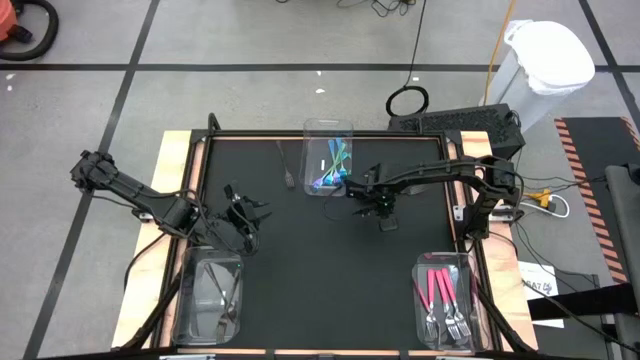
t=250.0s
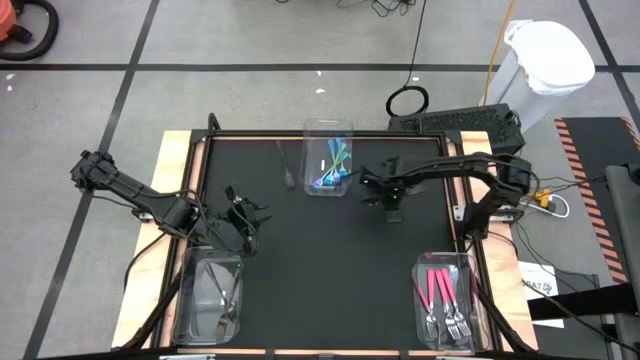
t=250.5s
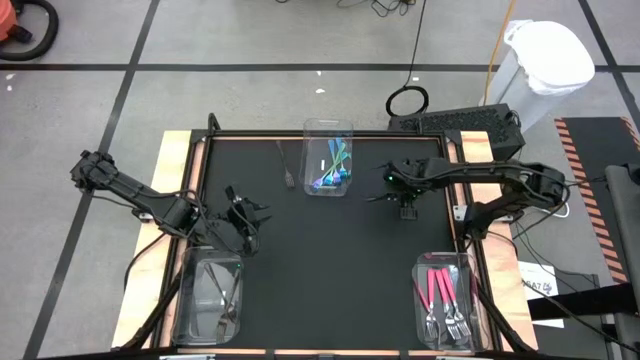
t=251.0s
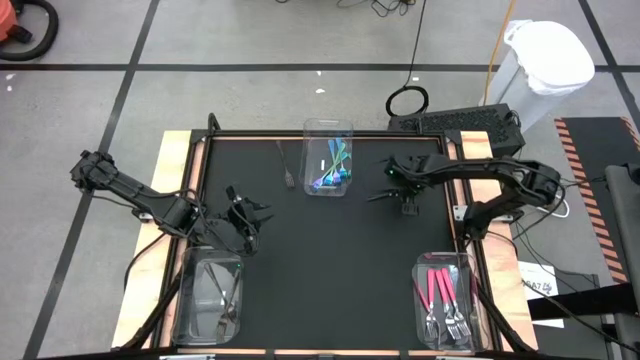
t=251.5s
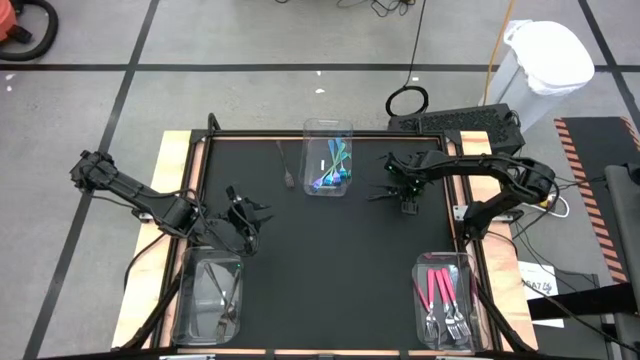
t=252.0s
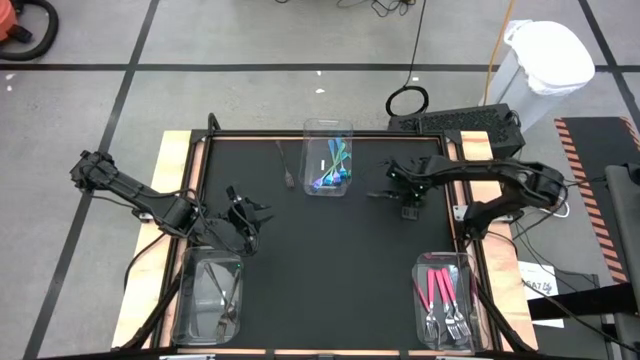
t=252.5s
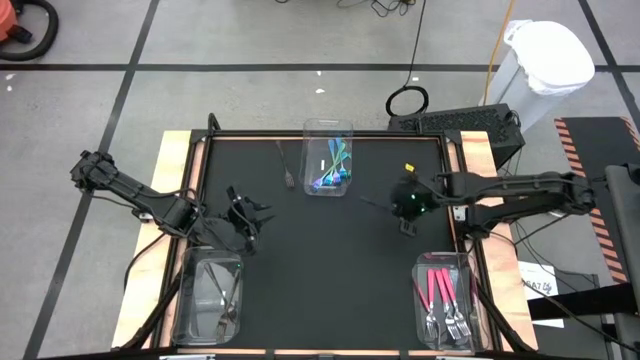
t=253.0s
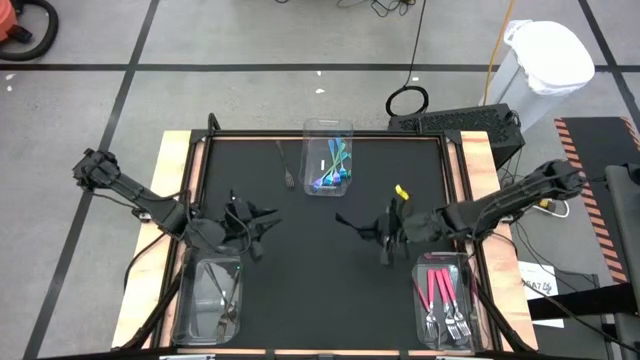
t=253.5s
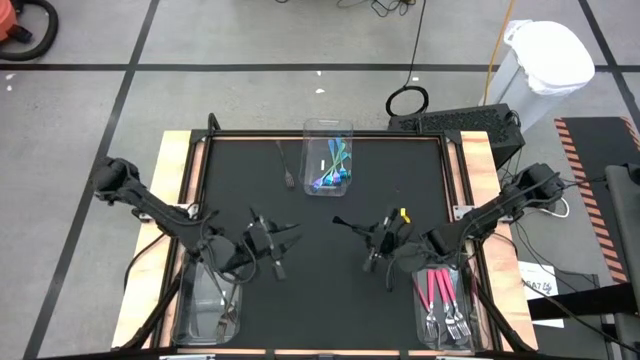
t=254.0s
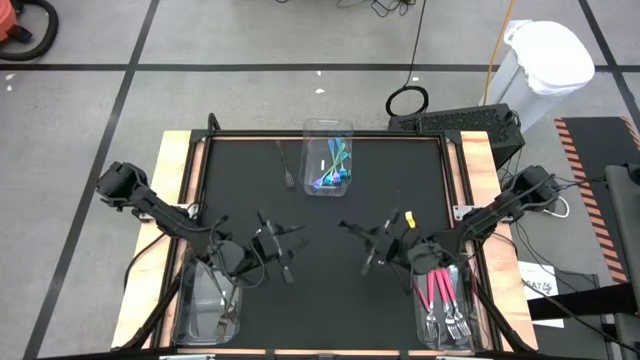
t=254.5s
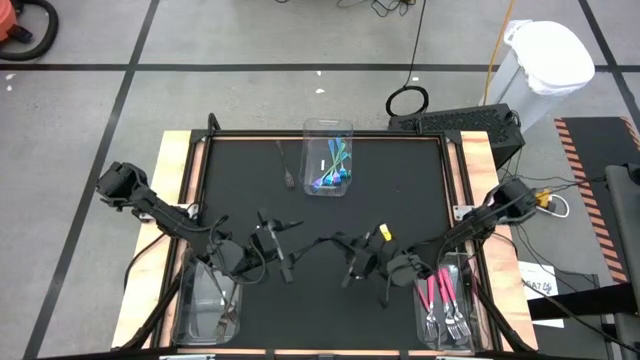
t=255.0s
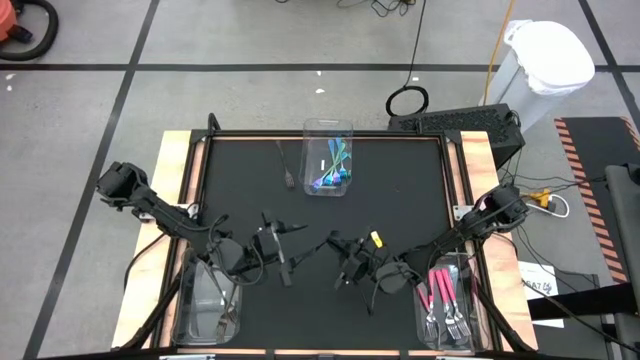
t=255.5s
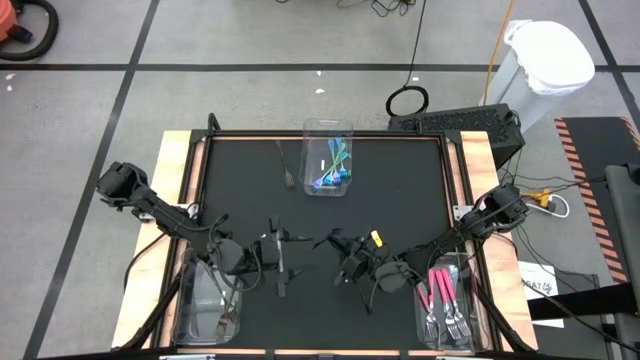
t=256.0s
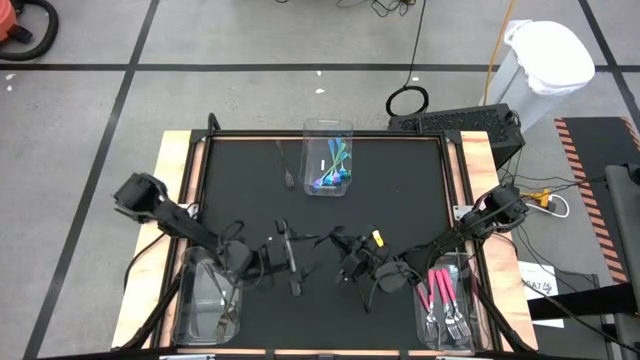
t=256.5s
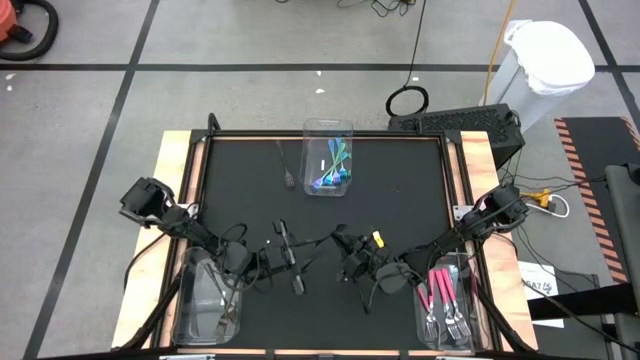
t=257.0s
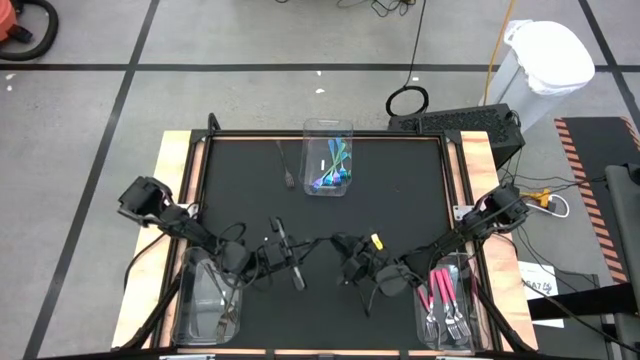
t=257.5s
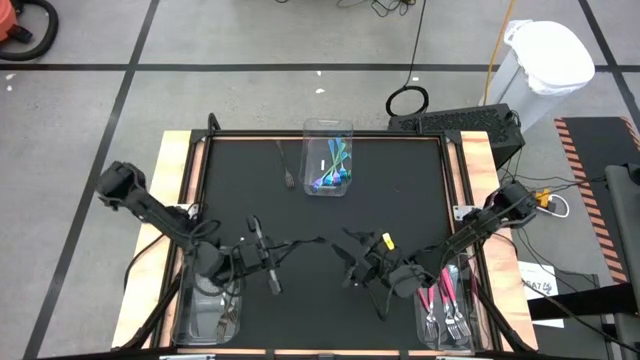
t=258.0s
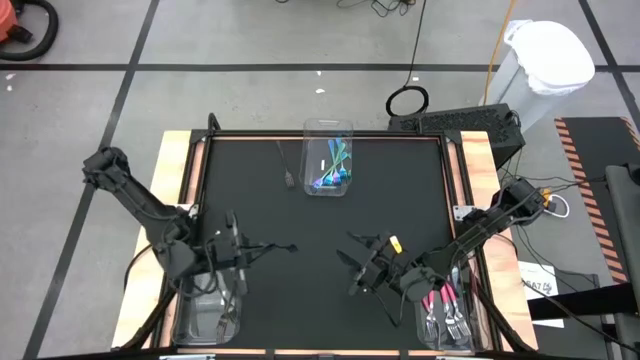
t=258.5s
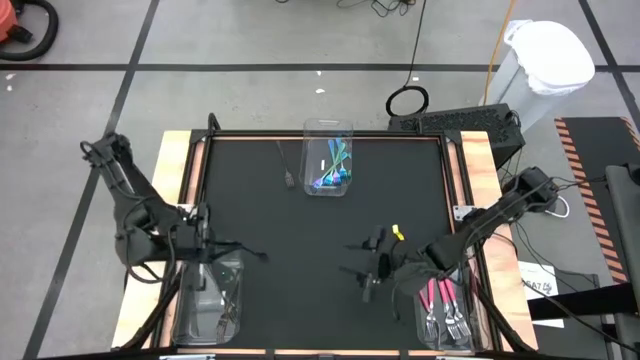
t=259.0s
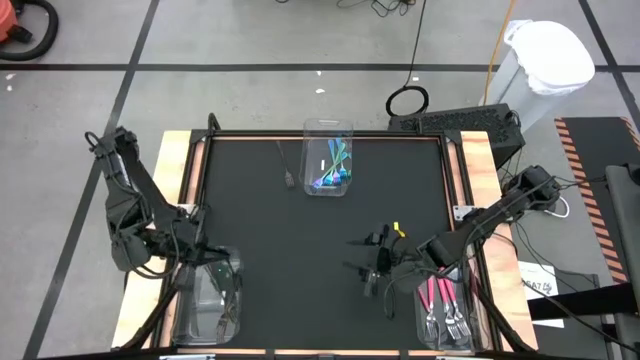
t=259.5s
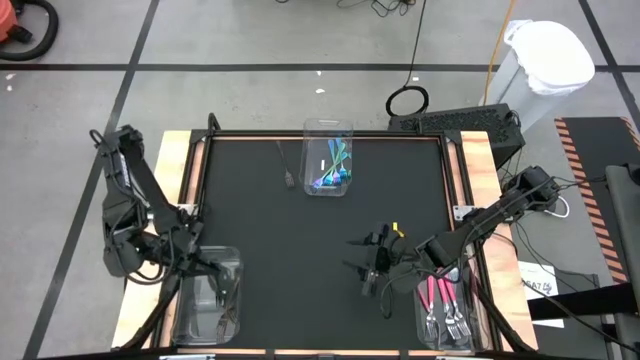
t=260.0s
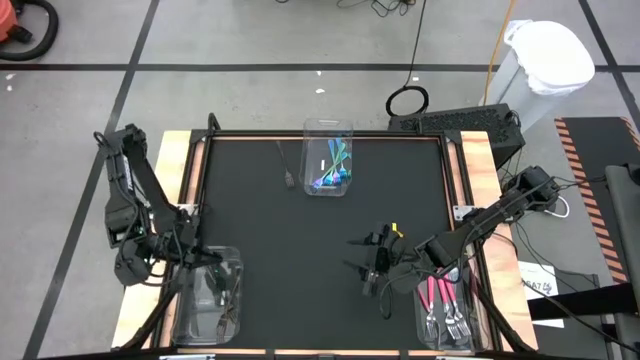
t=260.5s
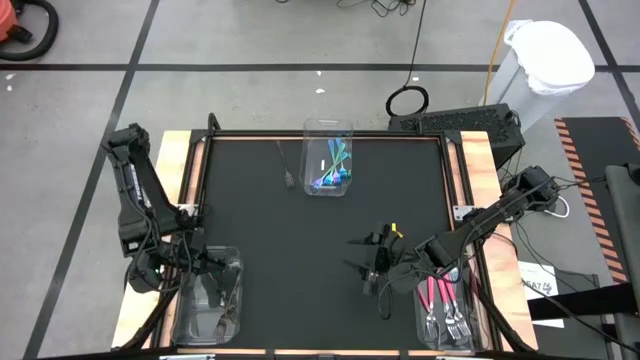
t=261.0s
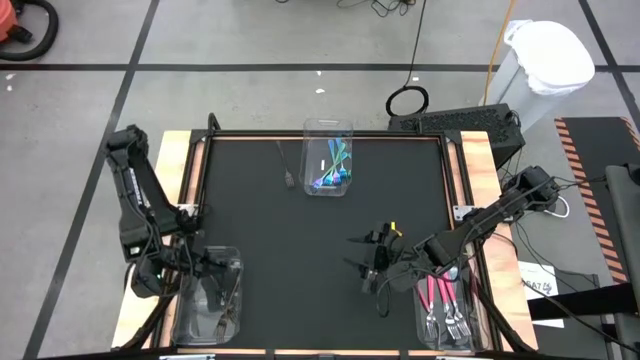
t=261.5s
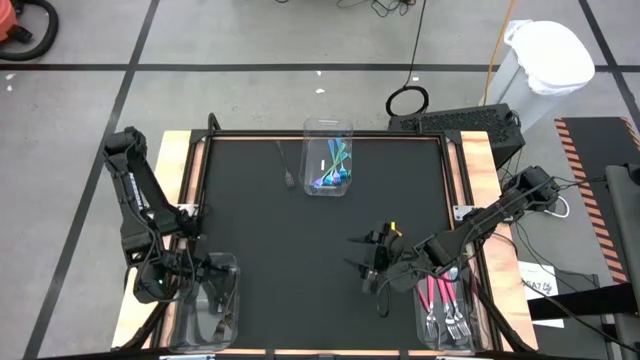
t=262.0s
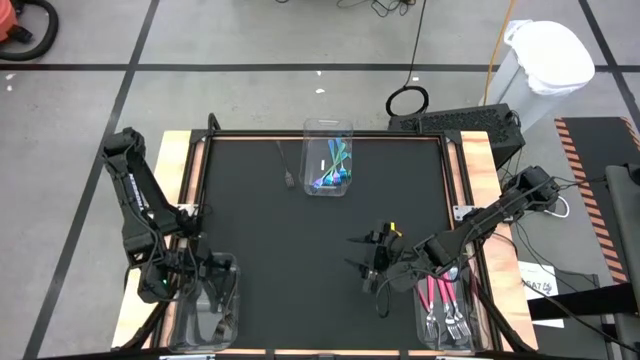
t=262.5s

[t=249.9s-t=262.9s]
Task: Sort silverware by color (type)
Put the black fork into the bottom left transparent bin

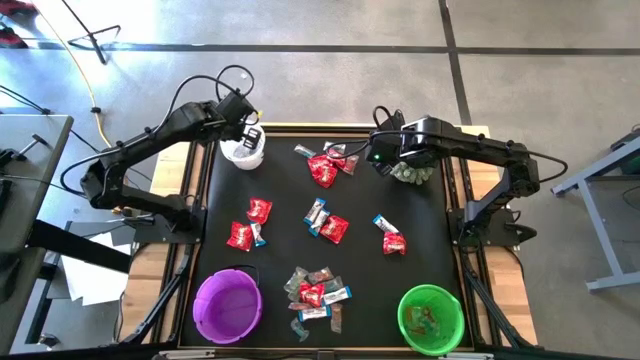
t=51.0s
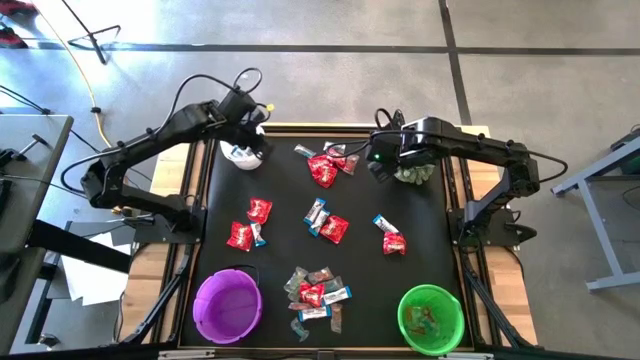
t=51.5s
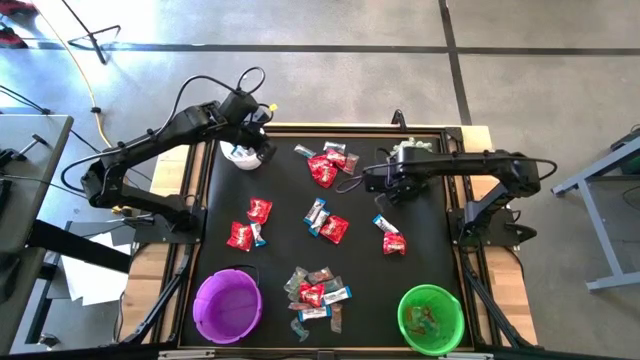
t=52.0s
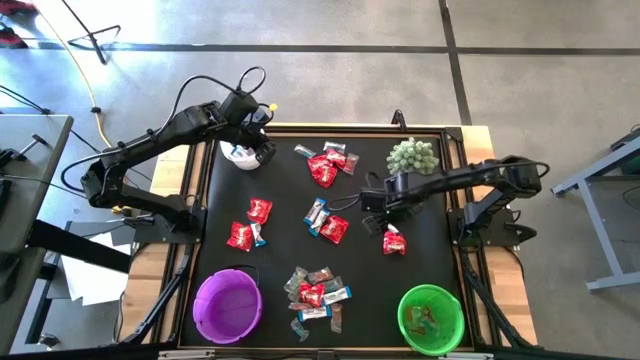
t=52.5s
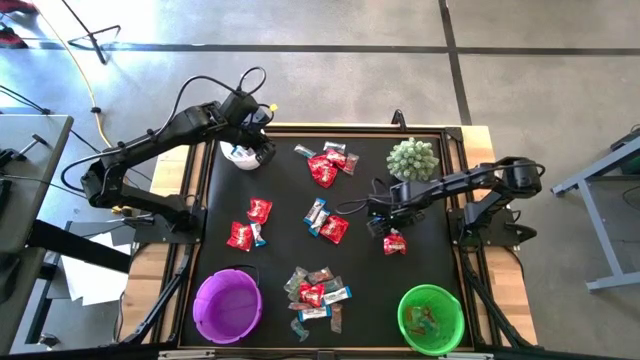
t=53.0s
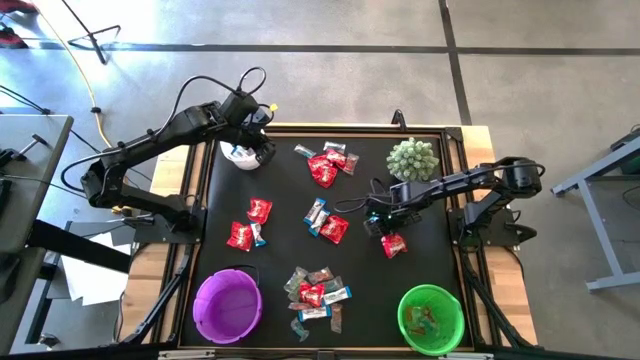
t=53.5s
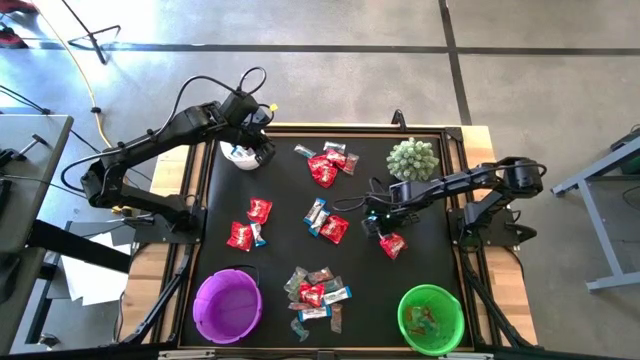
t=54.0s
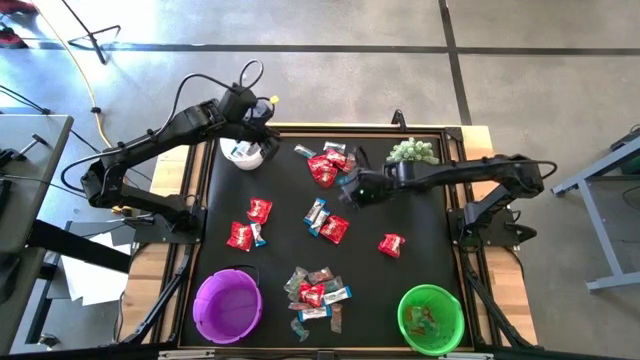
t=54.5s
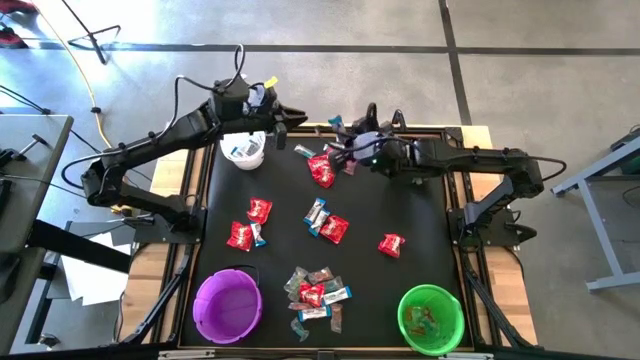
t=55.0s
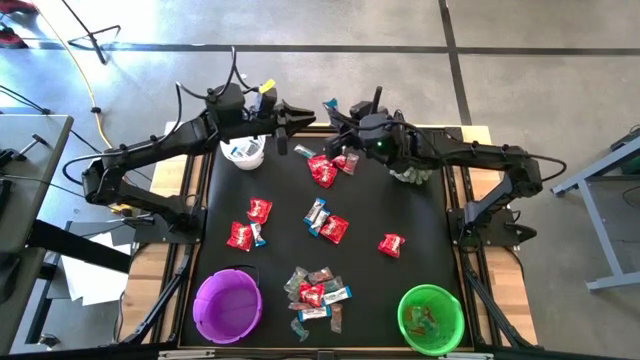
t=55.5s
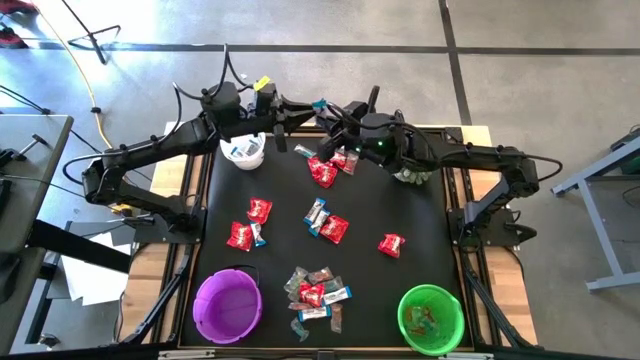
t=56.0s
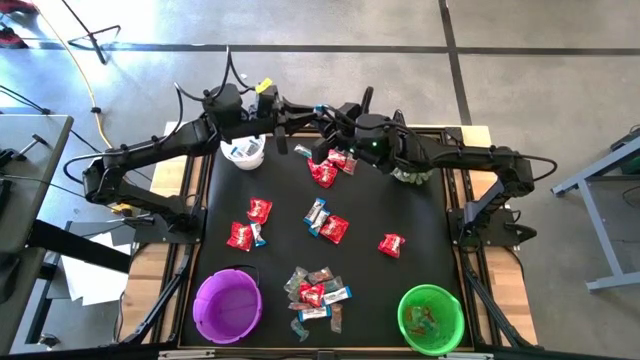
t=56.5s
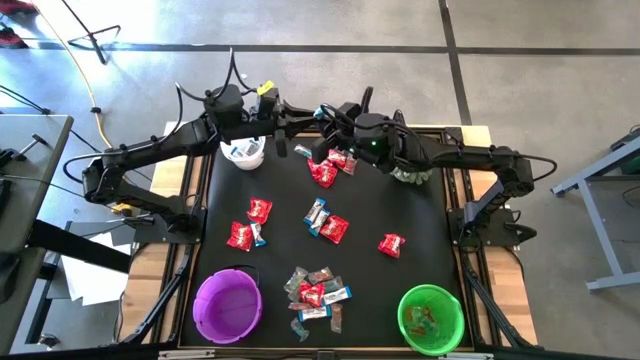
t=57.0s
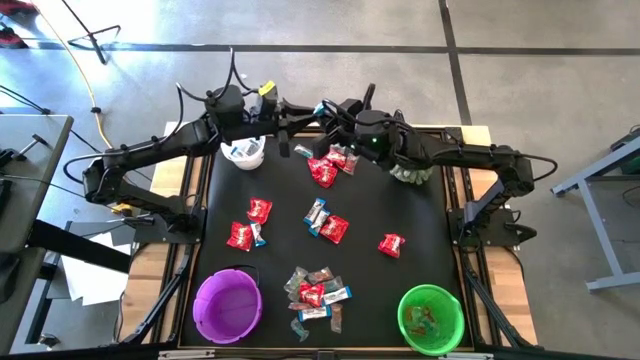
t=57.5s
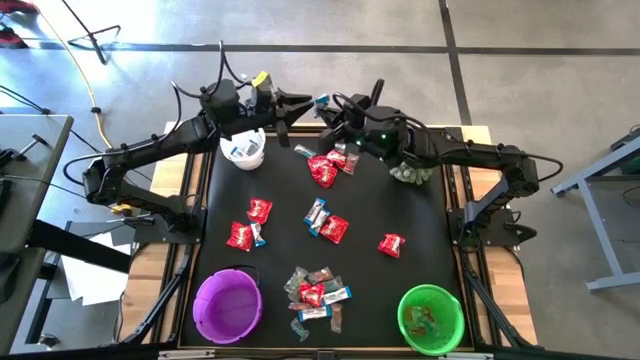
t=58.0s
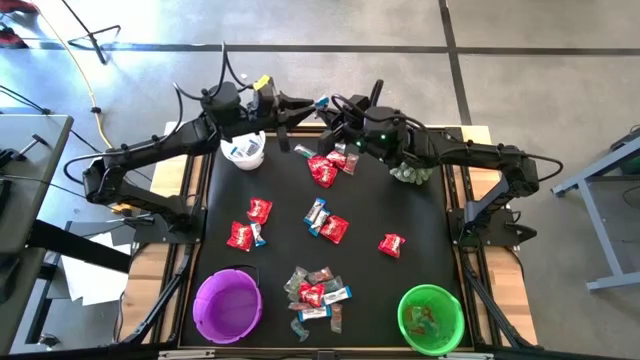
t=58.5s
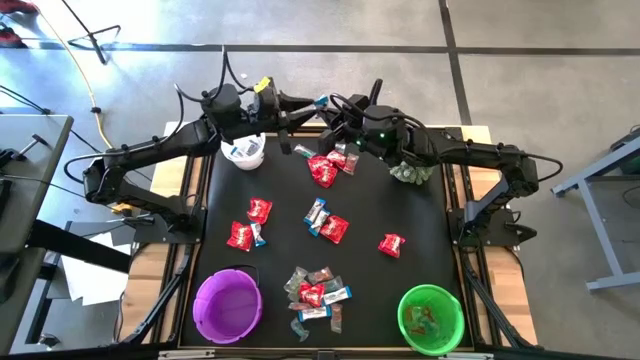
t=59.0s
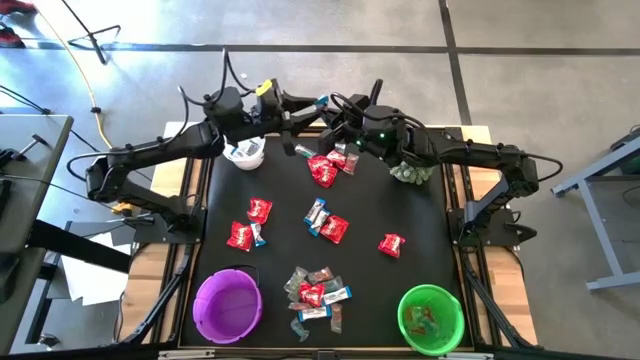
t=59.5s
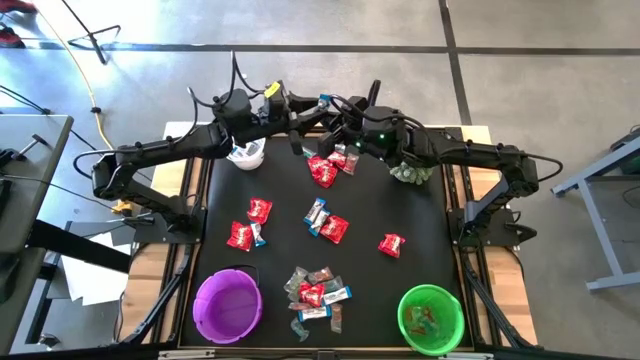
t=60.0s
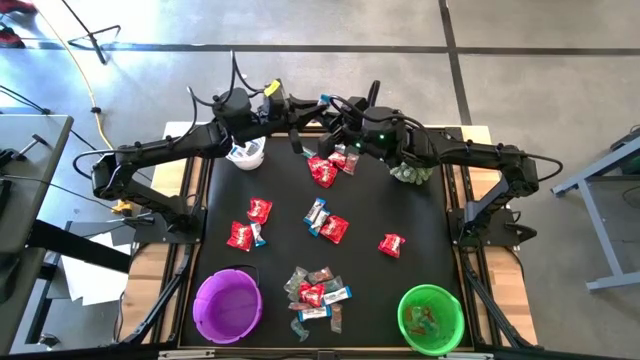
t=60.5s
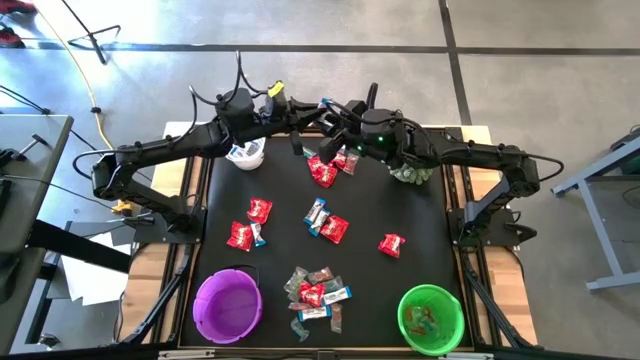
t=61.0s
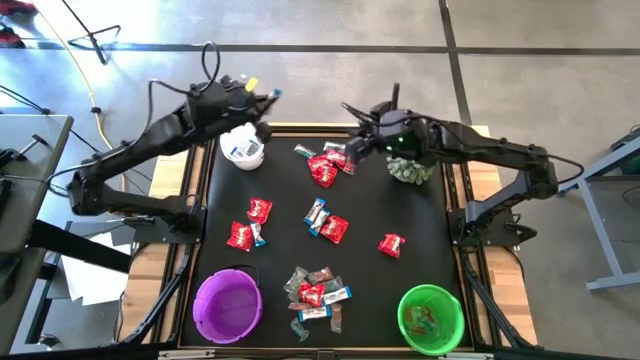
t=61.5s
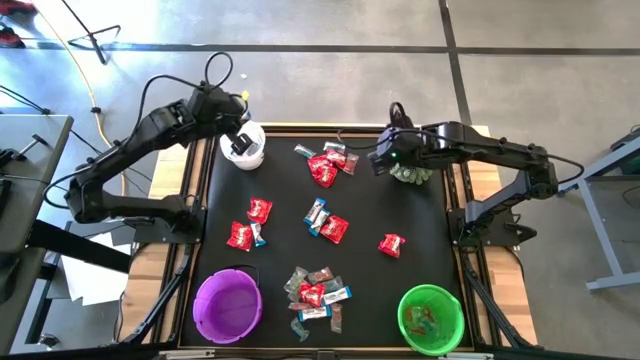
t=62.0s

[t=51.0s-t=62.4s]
Task: Sort candy
Put the white chocolate into the white bucket
